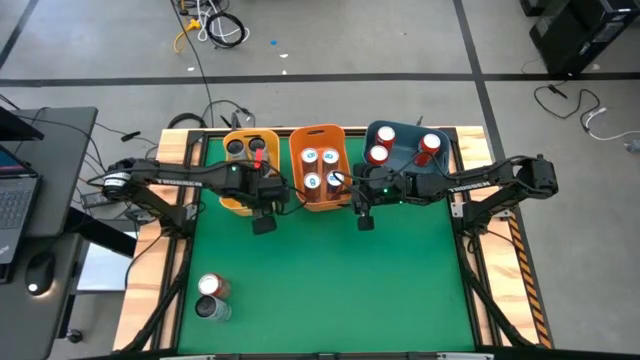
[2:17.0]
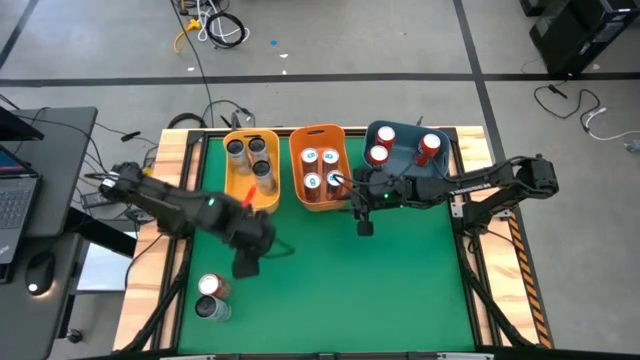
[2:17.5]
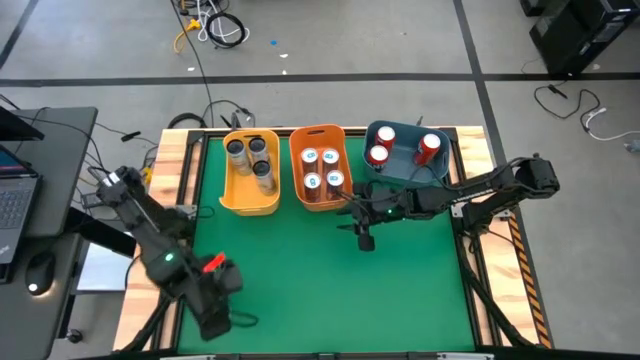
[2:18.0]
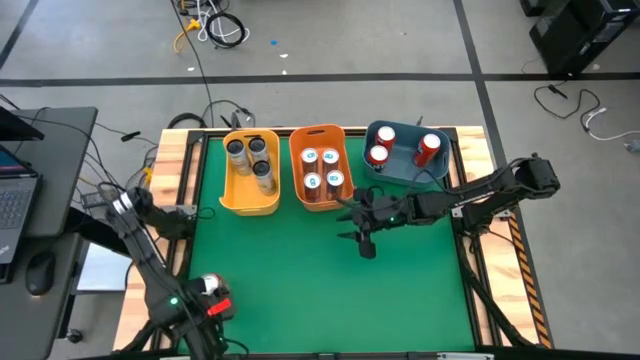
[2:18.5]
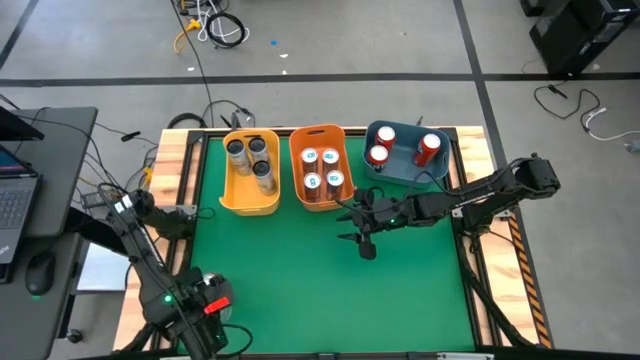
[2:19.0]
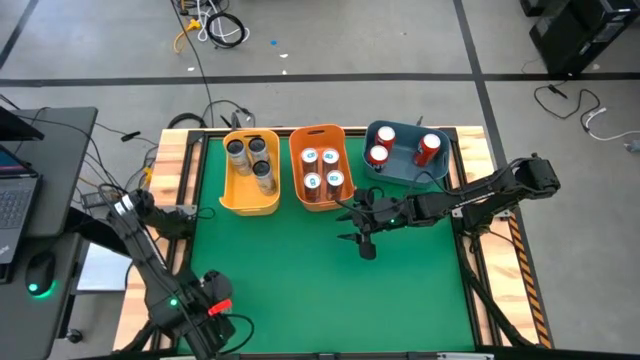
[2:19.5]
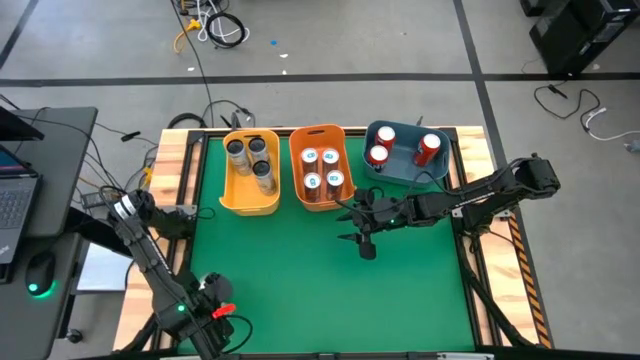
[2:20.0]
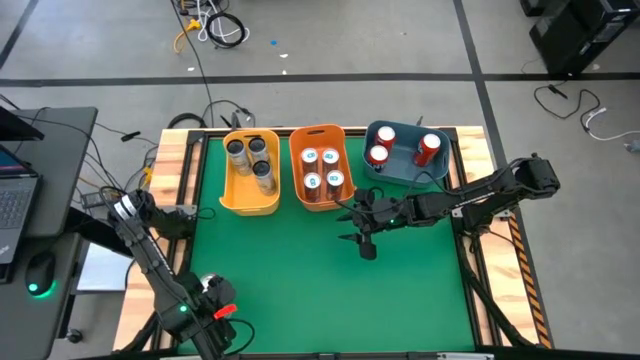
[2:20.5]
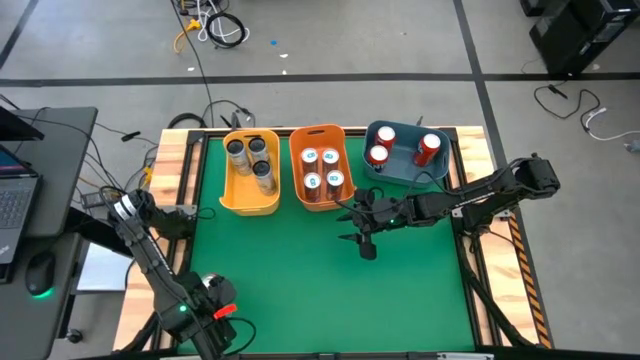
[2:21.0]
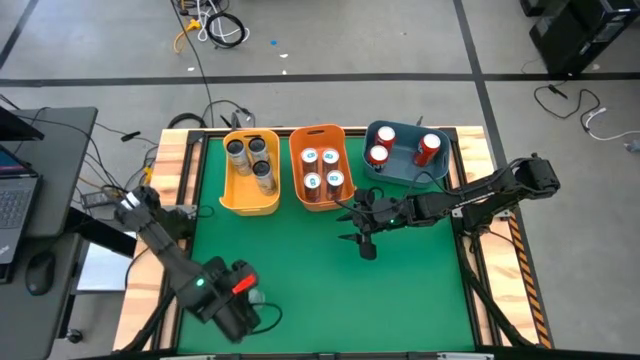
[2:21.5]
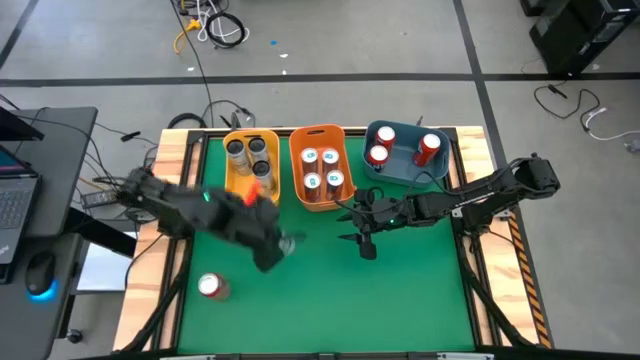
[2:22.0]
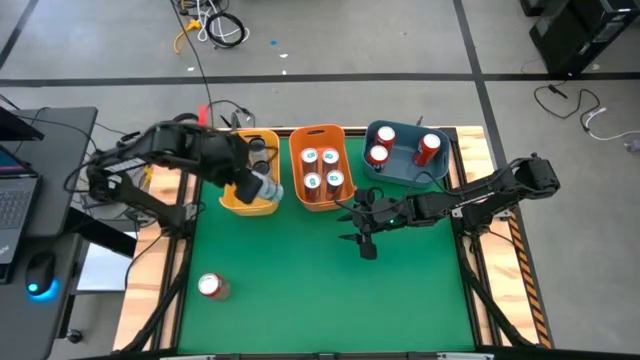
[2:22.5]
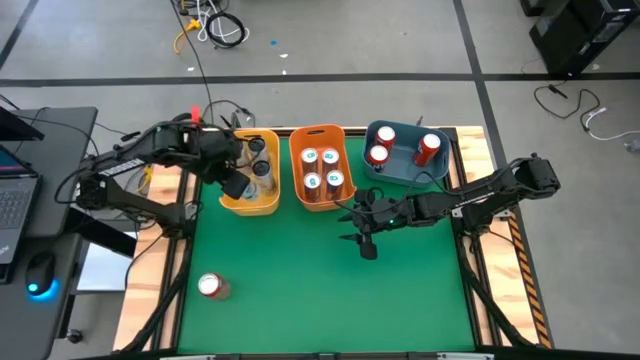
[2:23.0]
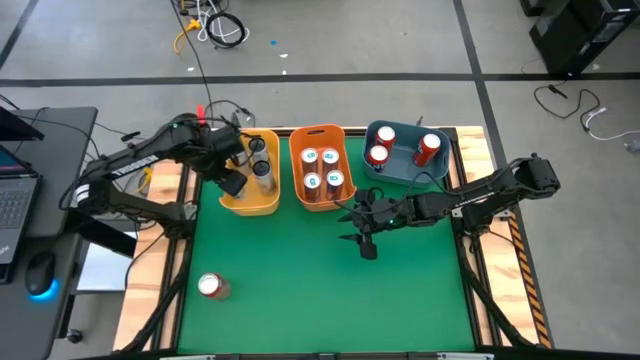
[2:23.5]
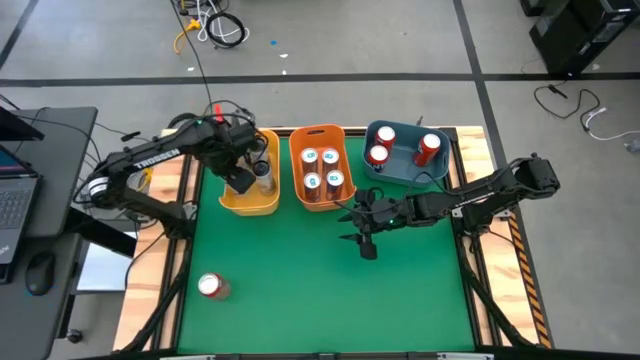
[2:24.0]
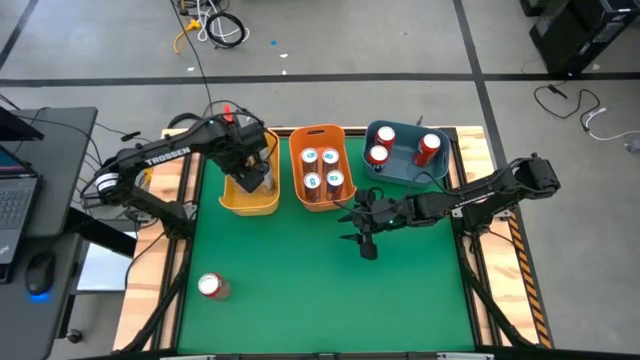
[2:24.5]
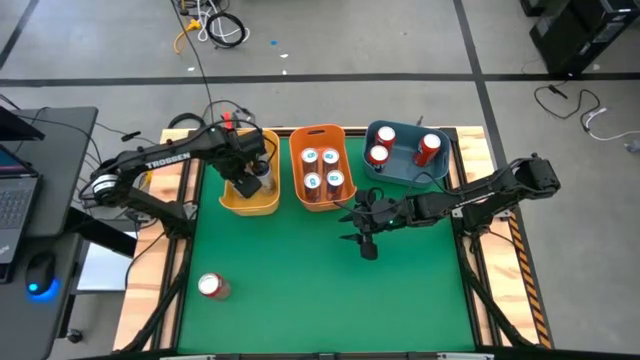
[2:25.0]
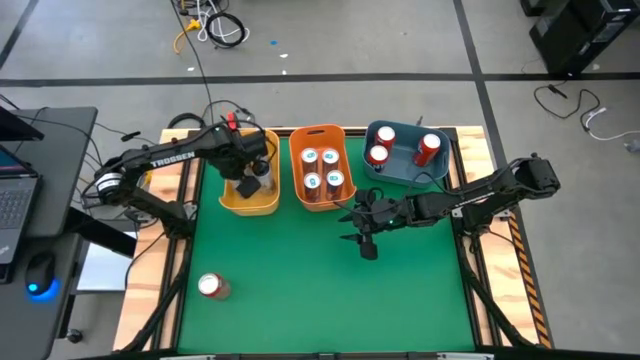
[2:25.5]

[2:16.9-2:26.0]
Task: Sort soda cans
Put the white blue soda can into the yellow bin

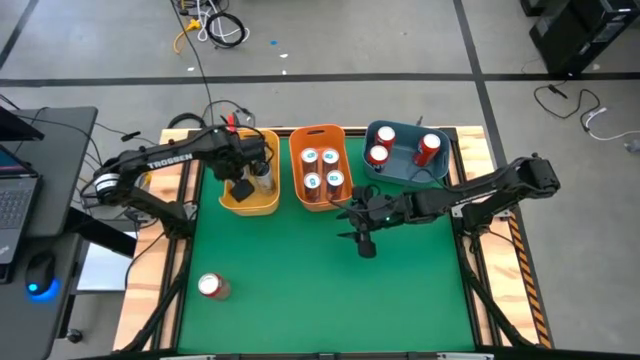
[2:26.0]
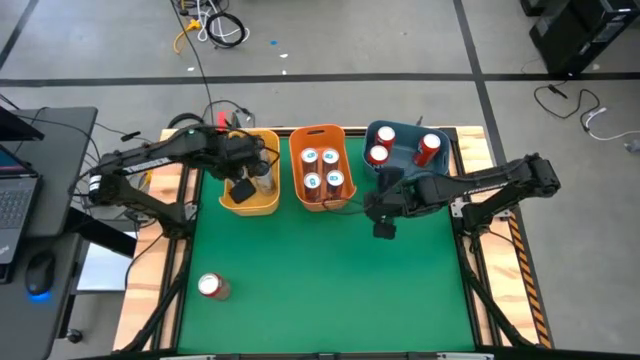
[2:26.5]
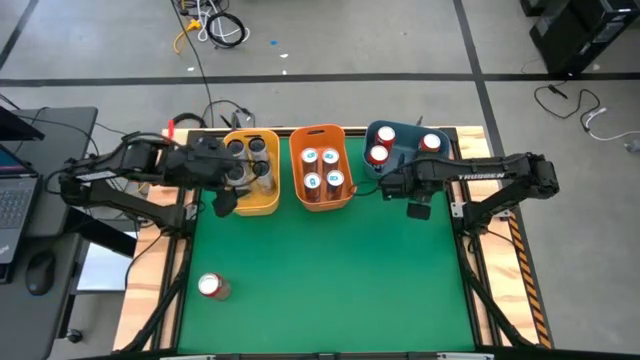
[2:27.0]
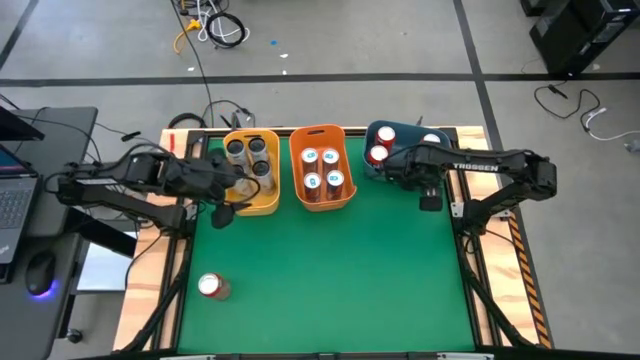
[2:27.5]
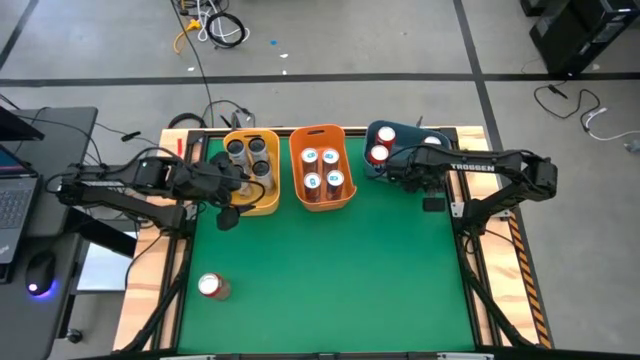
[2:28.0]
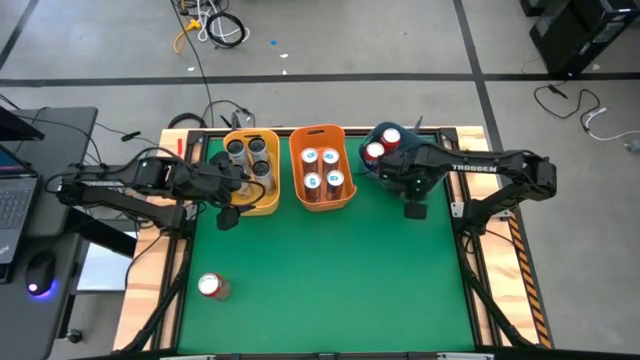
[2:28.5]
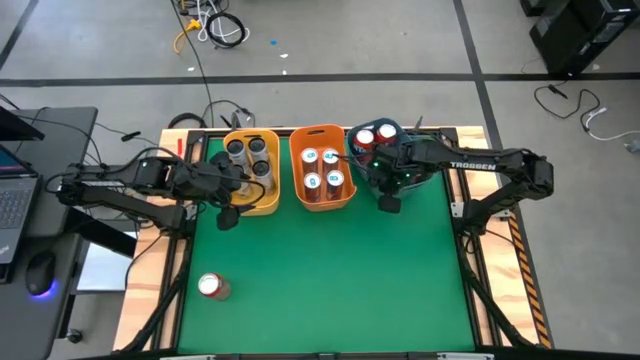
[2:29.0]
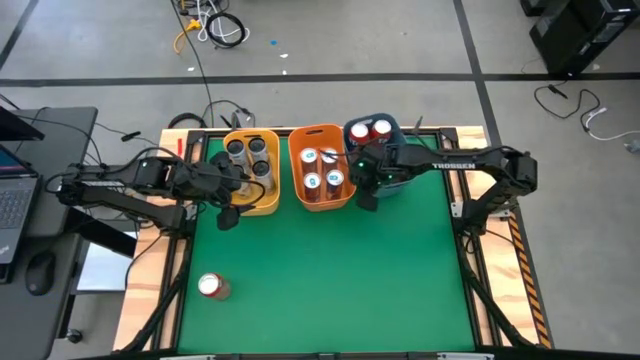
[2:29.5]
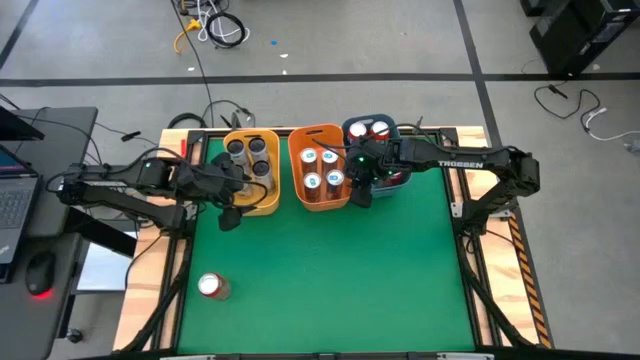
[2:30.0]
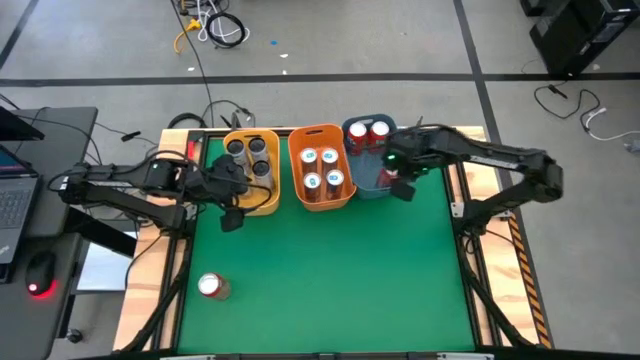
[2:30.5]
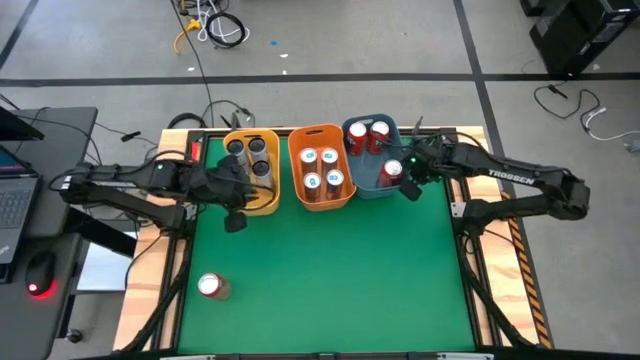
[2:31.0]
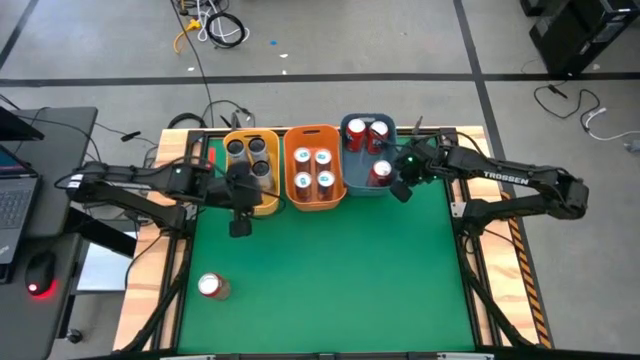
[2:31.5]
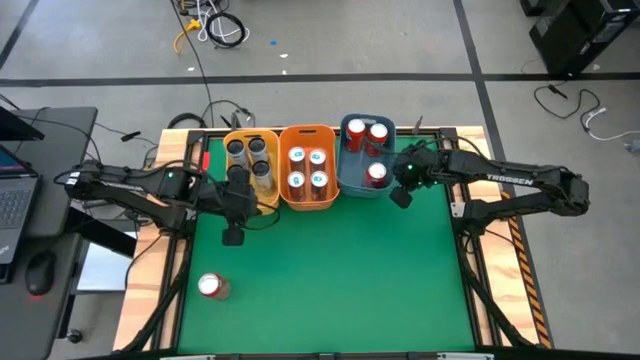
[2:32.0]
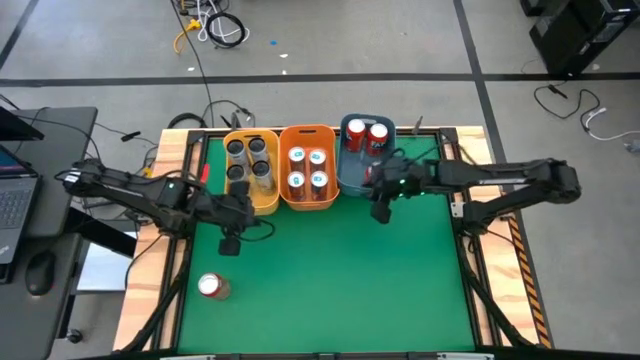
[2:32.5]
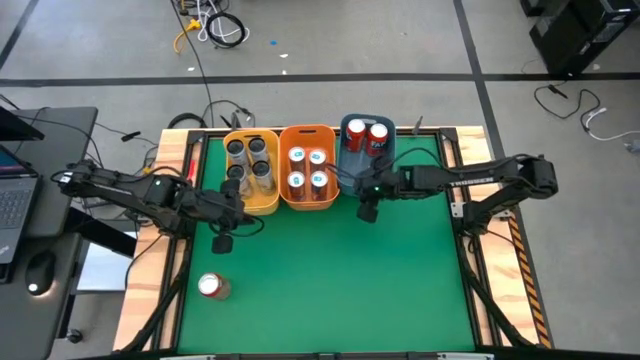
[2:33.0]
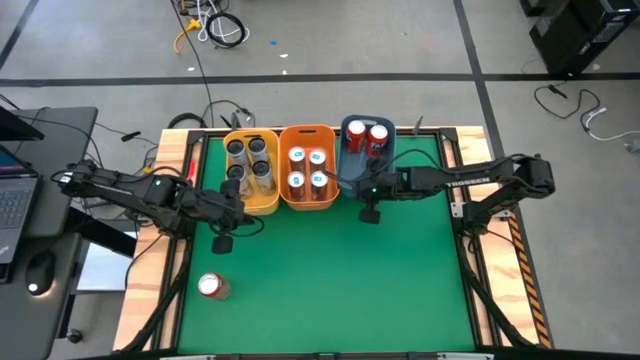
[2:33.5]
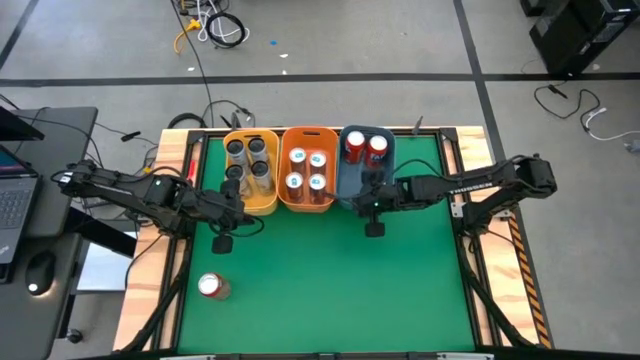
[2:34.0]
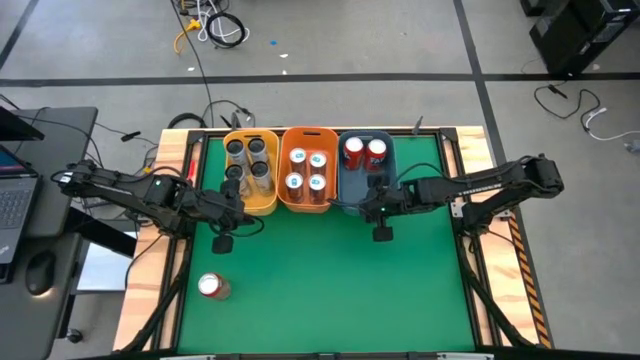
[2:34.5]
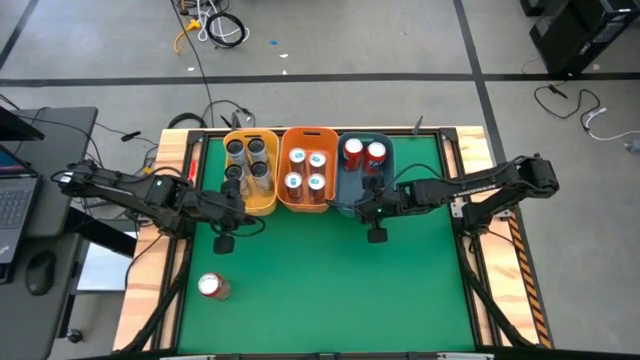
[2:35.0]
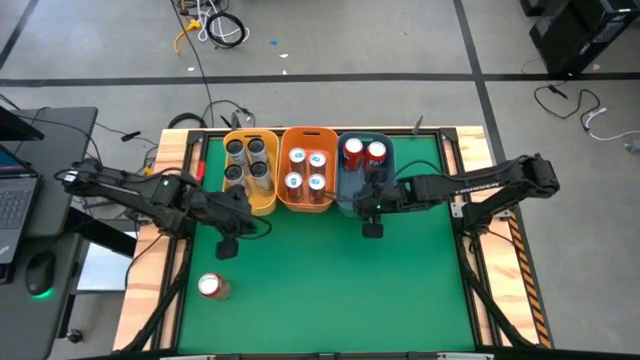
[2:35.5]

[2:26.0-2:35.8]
Adjust the blue bin

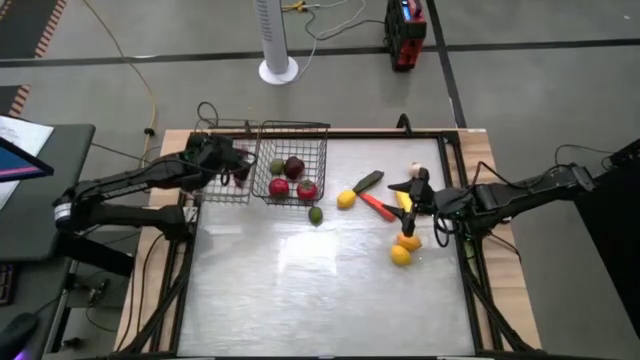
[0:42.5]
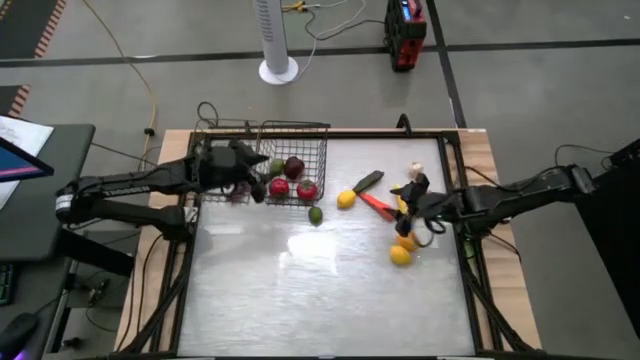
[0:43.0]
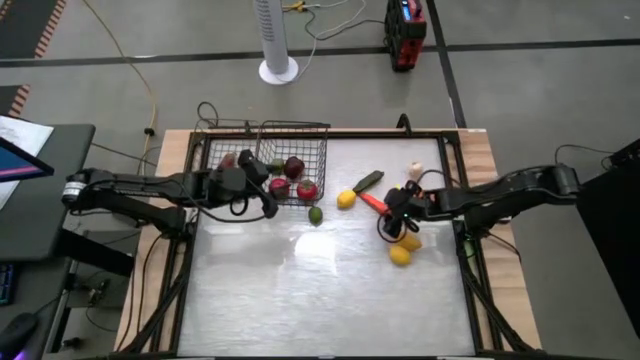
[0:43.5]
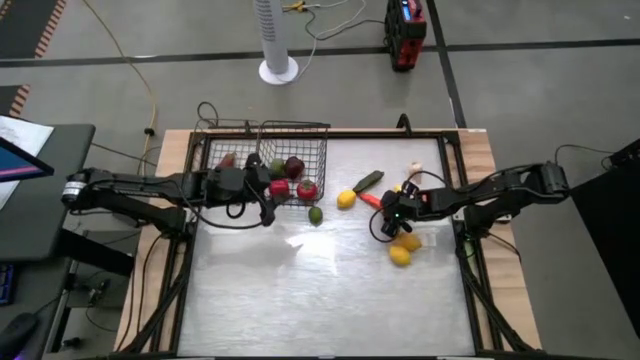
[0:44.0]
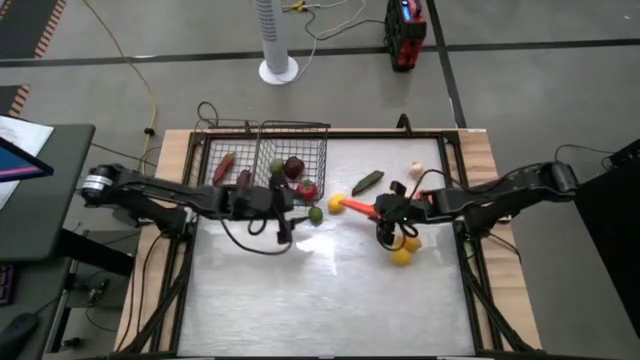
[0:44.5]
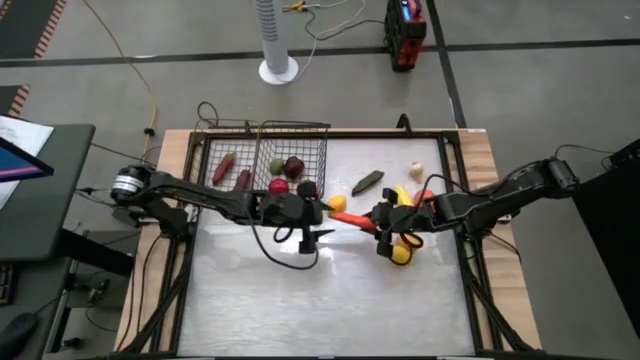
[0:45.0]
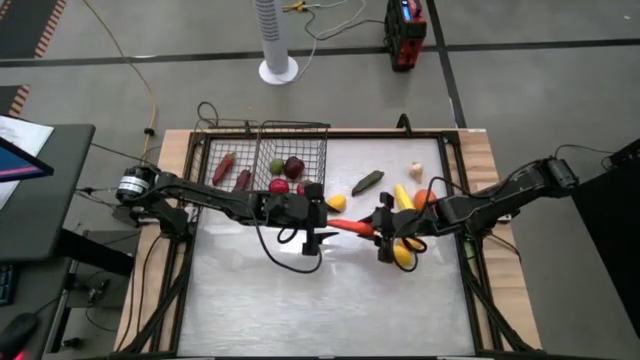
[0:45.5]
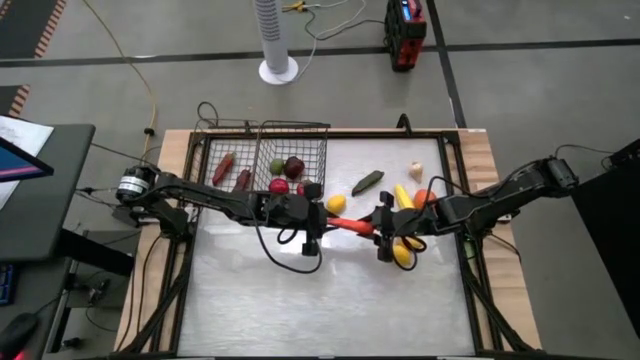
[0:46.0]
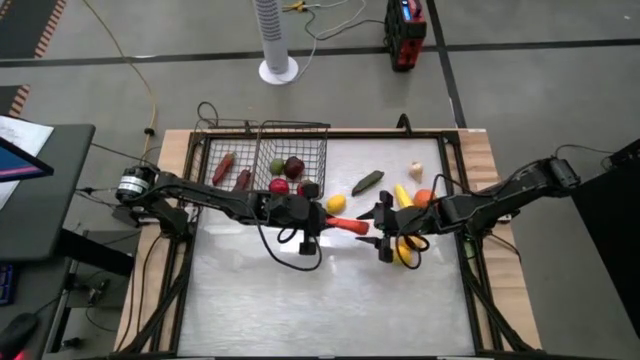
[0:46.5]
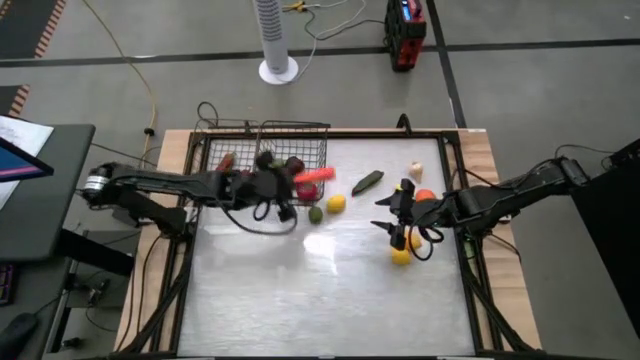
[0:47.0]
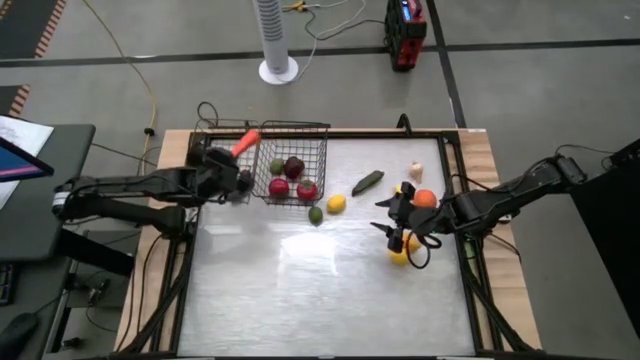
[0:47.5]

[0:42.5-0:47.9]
Task: Sort produce into baskets
Put the orange carrot into the left wire basket
